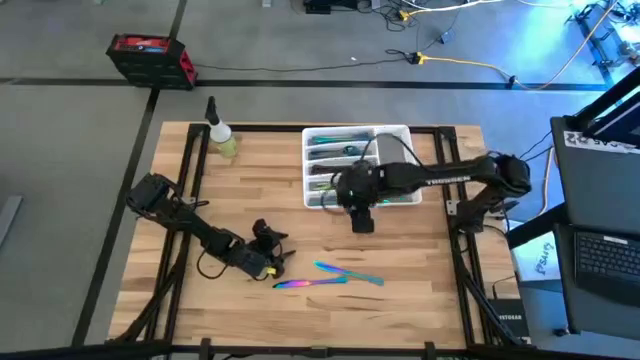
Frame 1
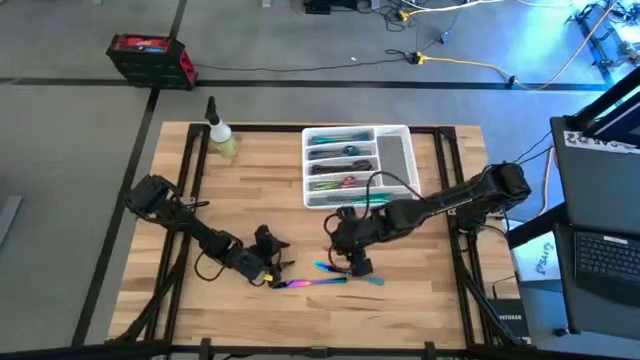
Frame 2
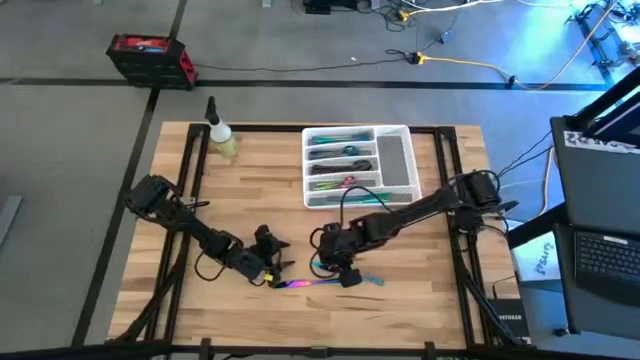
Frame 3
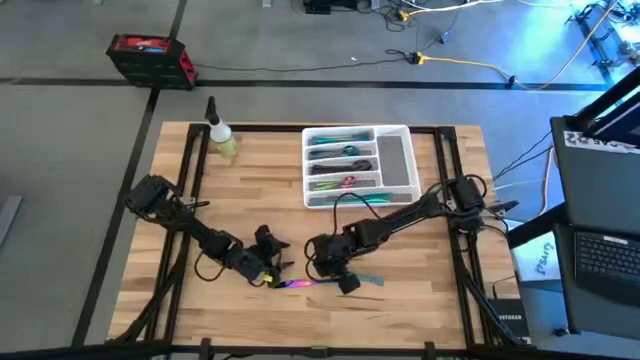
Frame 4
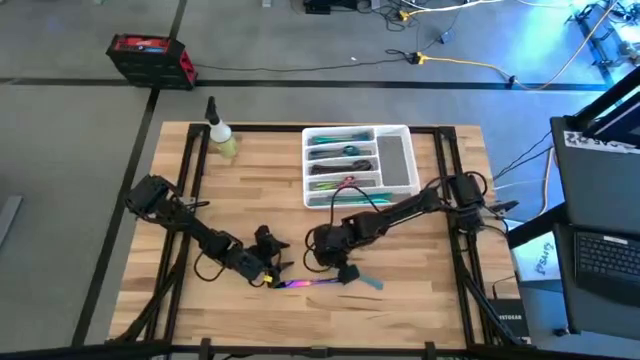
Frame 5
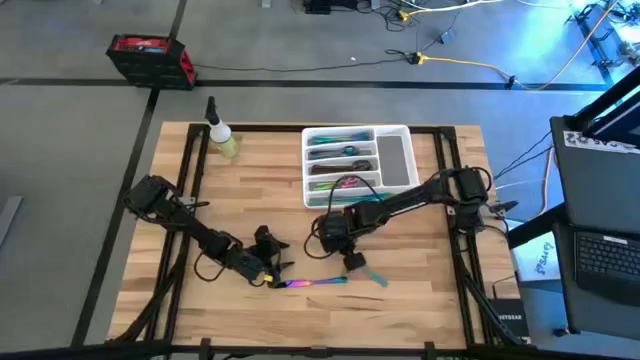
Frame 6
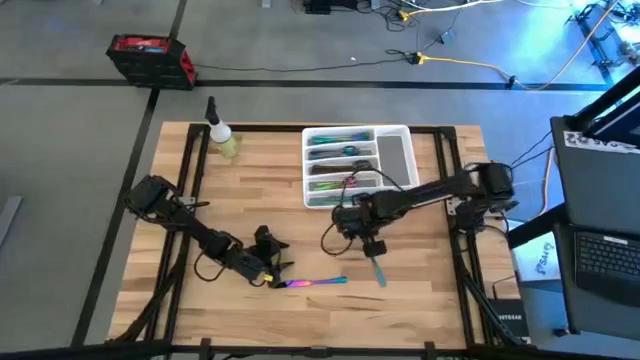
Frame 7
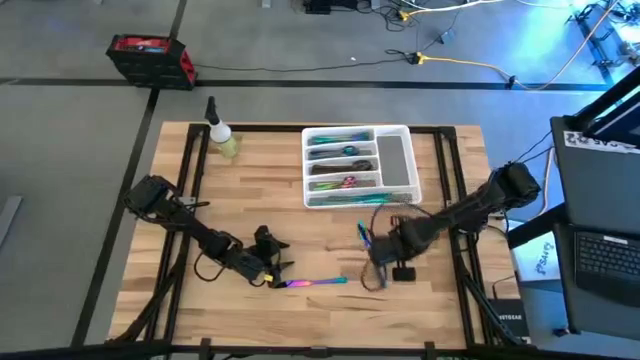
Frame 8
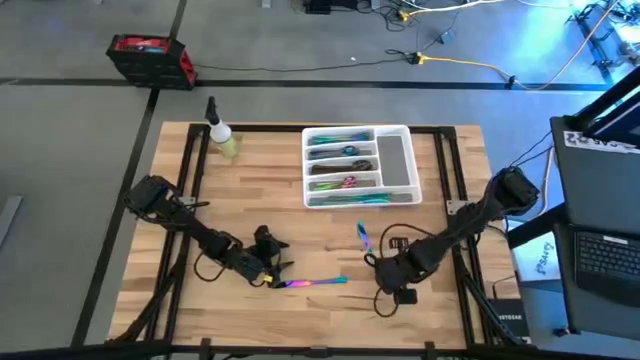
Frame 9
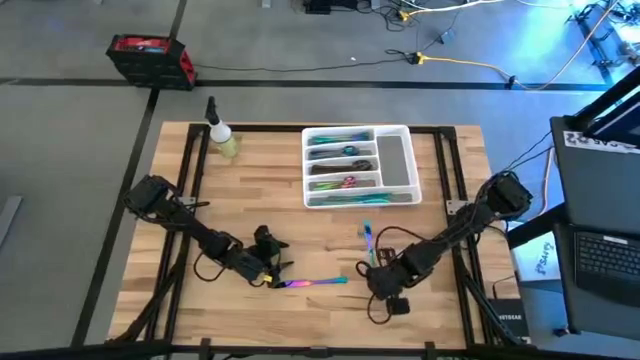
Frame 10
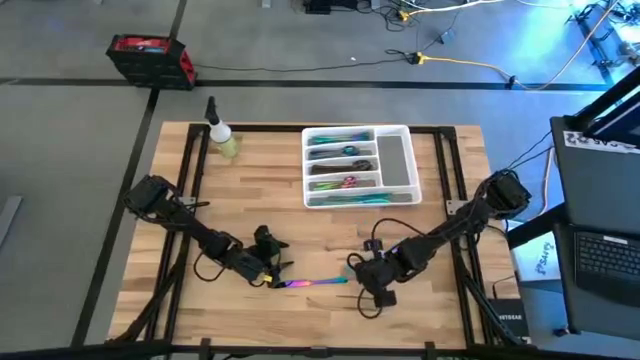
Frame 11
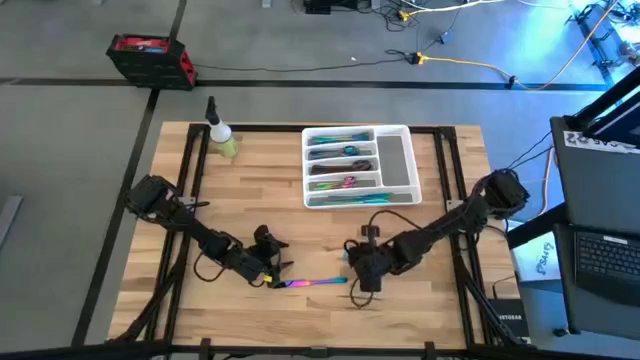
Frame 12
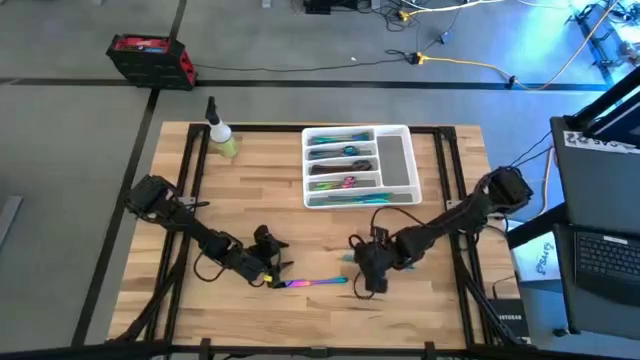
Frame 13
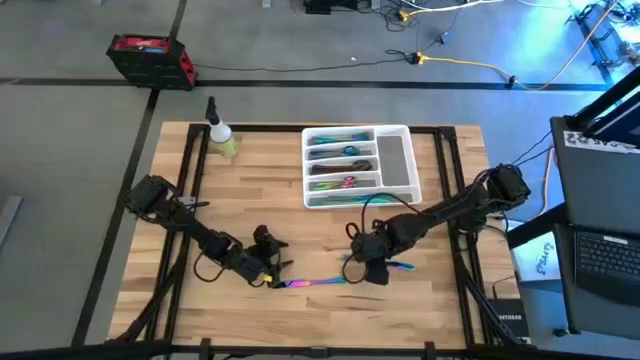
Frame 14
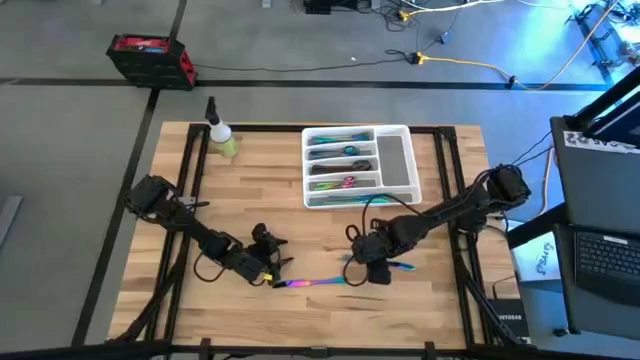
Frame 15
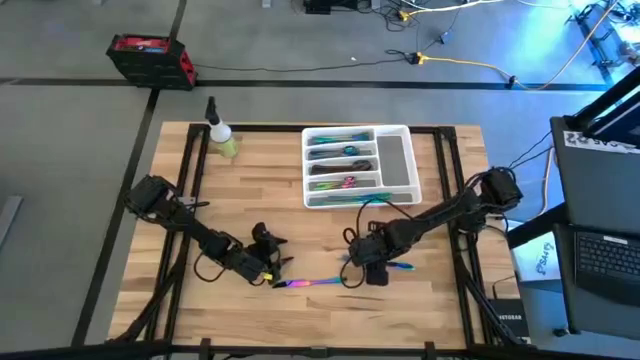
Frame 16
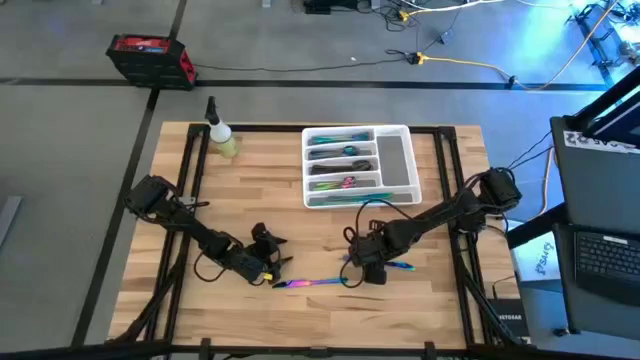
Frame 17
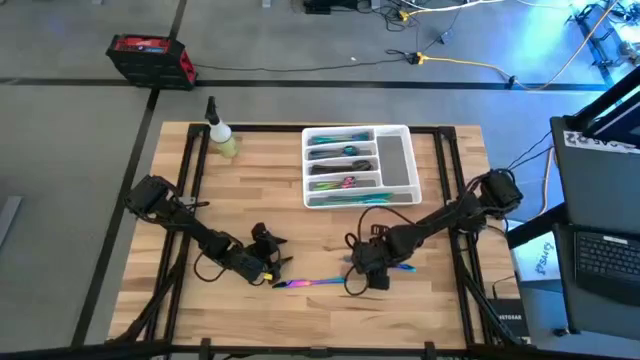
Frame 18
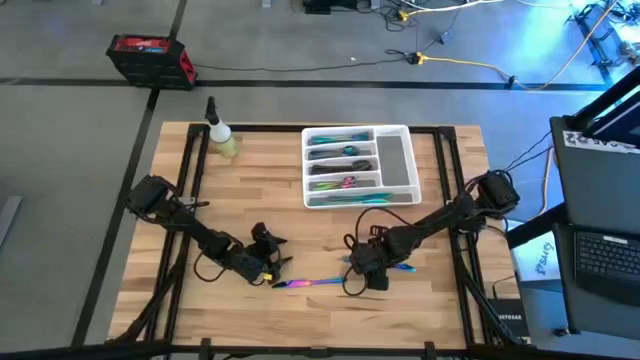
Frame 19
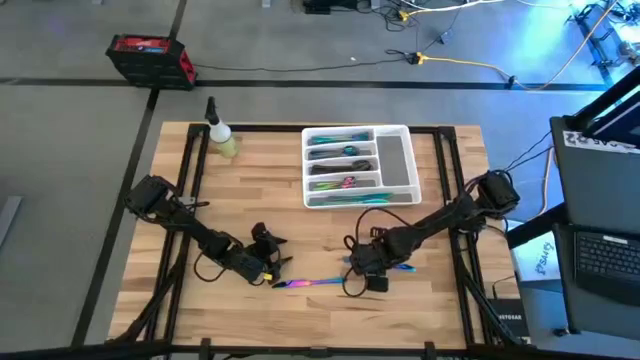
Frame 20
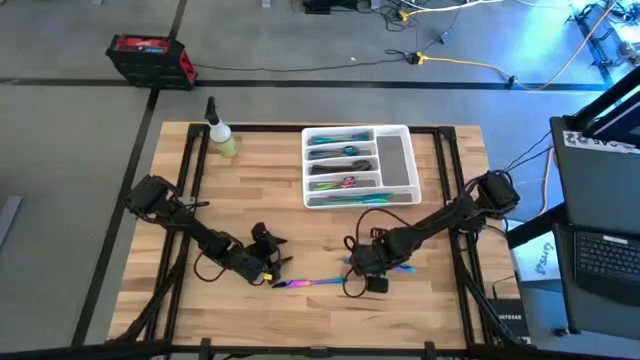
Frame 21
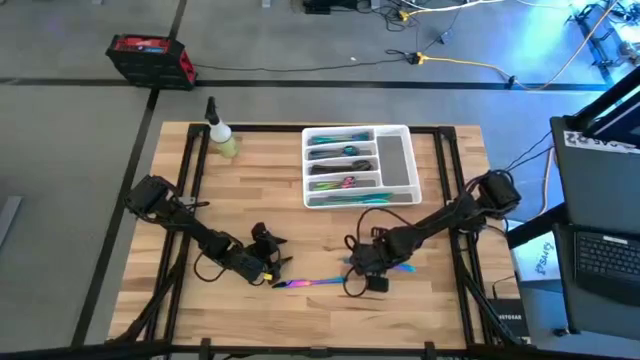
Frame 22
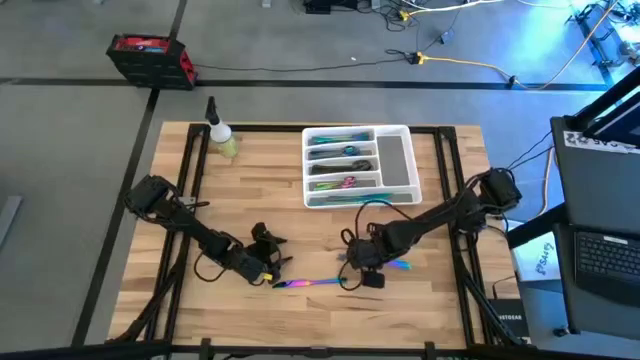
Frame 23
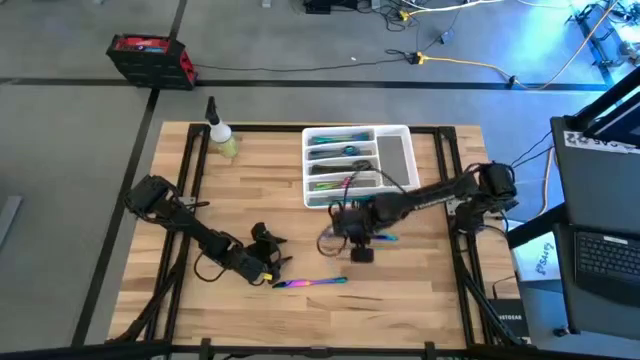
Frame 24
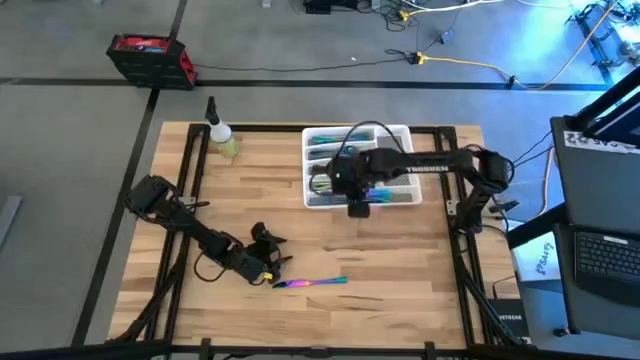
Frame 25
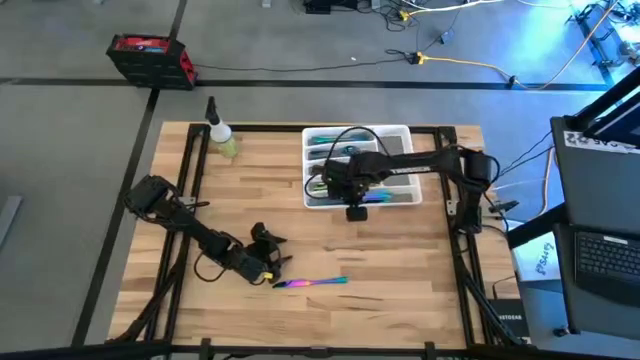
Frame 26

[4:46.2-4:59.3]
Task: Sort silverware
Put the blue knife on the white silverware tray

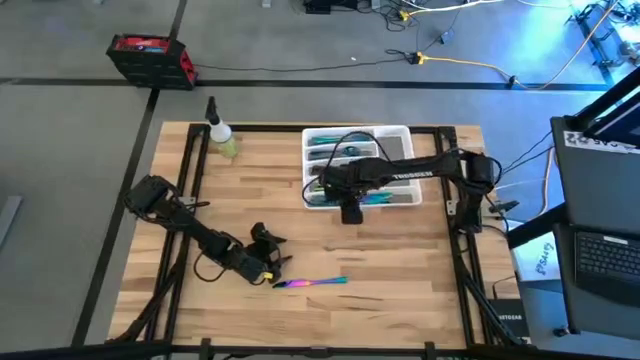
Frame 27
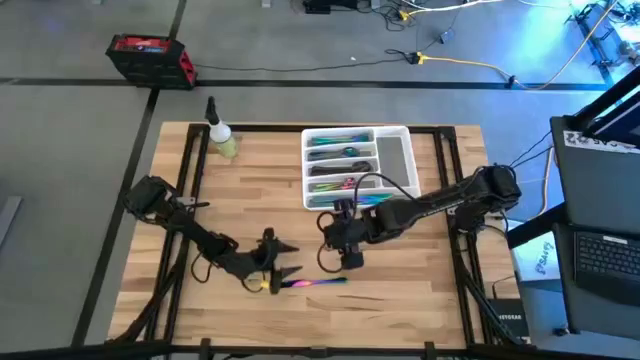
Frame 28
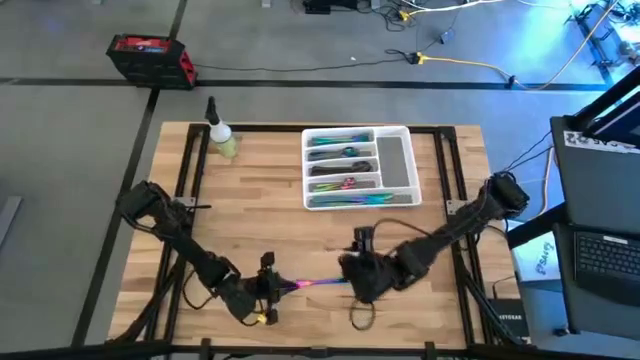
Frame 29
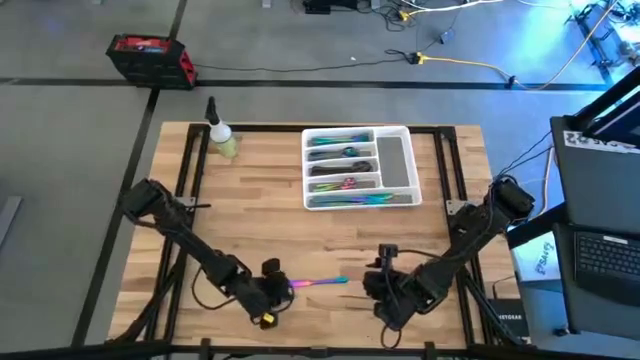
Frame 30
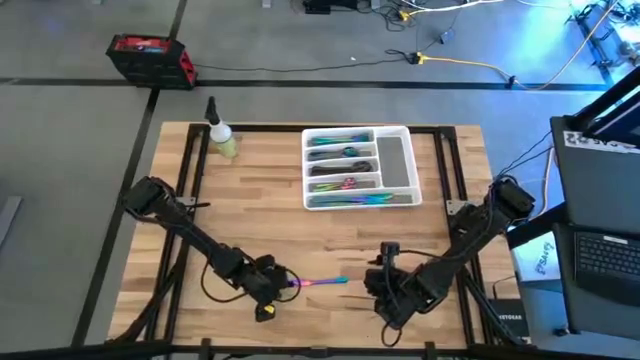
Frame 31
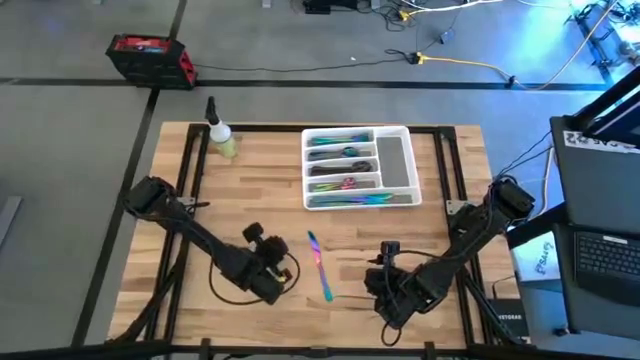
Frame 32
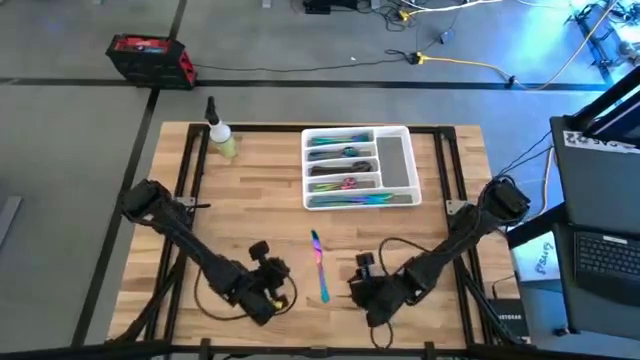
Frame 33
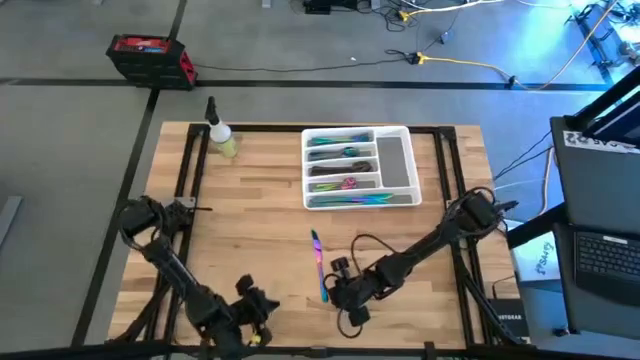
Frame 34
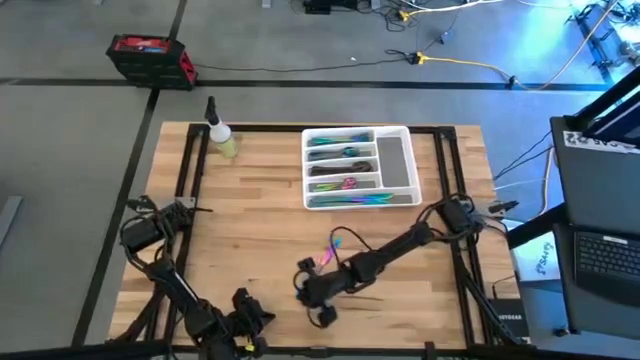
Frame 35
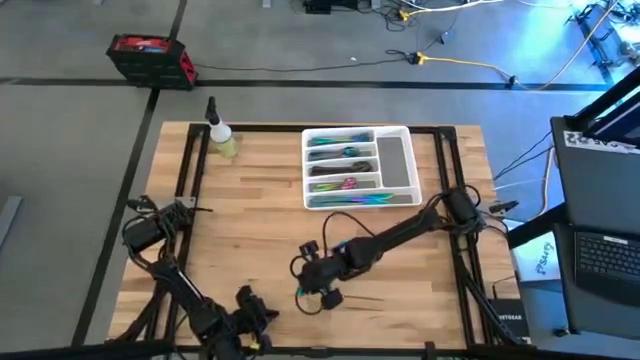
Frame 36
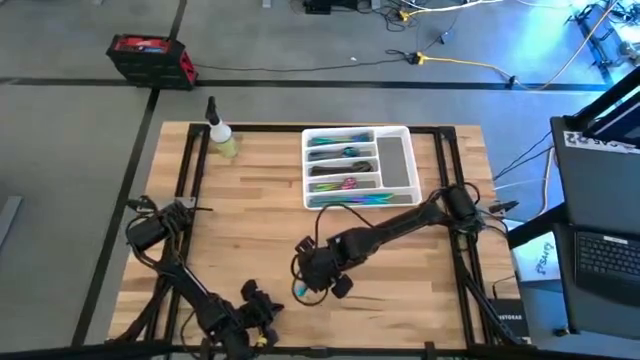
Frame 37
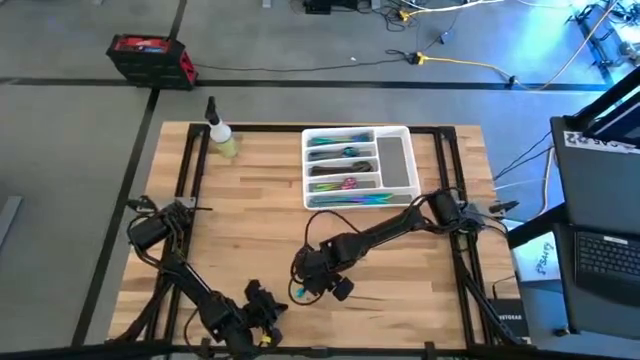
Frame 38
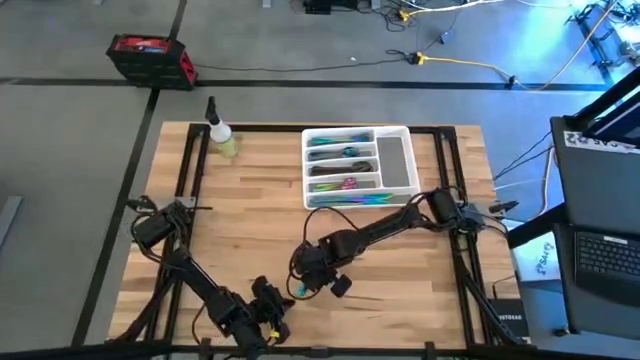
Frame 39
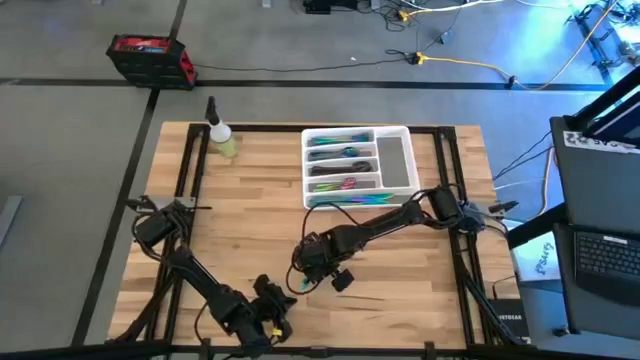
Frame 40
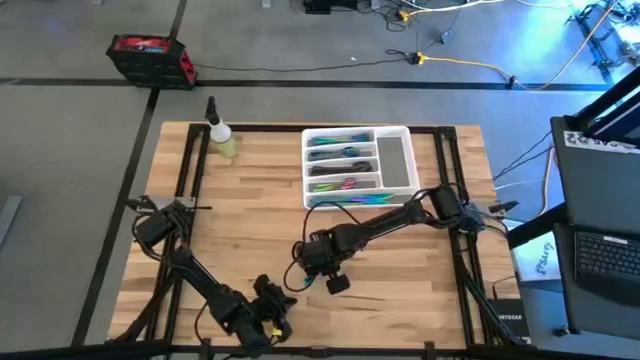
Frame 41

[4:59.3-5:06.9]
Put the blue knife on the white silverware tray

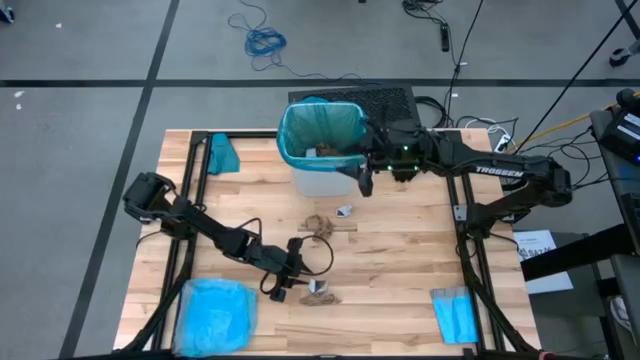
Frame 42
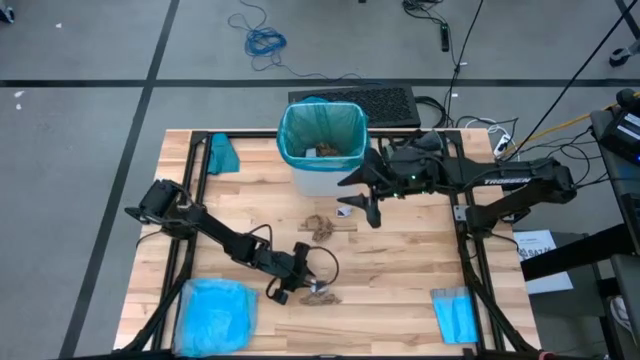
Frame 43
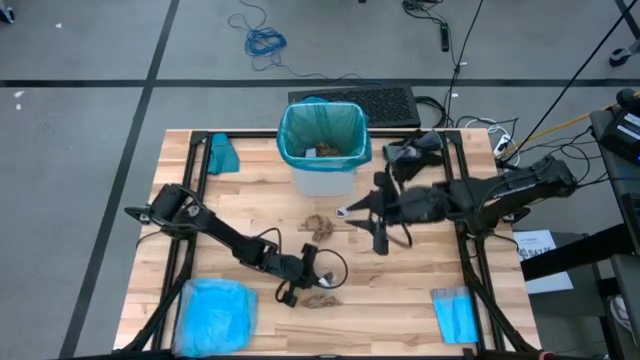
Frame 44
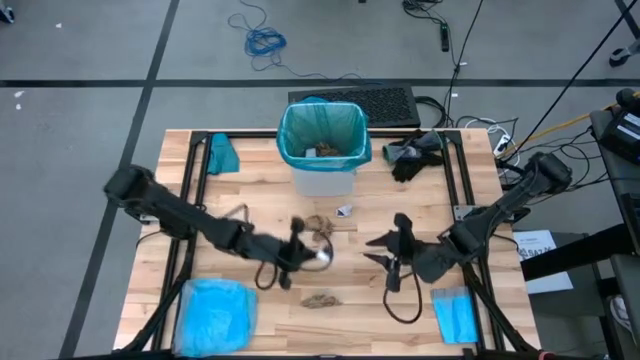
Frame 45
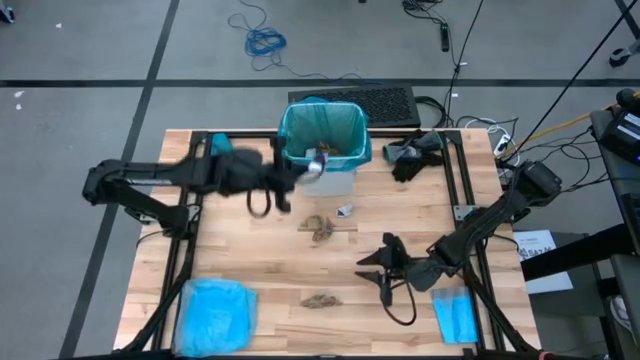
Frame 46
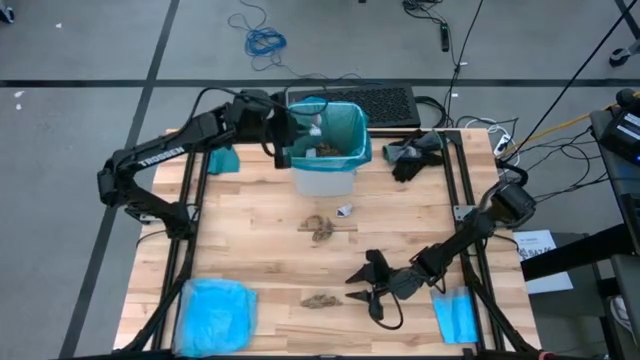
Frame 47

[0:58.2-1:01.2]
Task: place trash/remove bag and relplace
Put the white paper into the trash bin
